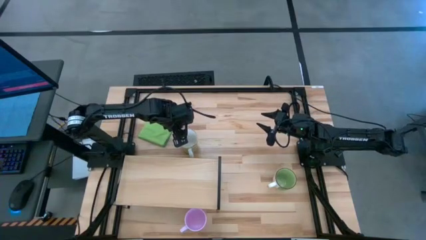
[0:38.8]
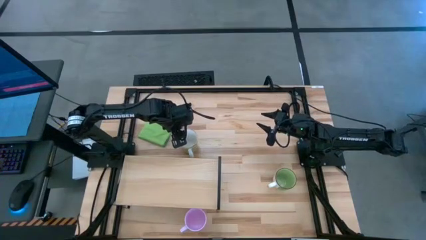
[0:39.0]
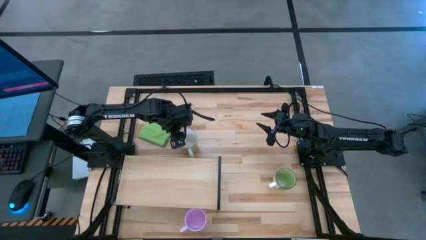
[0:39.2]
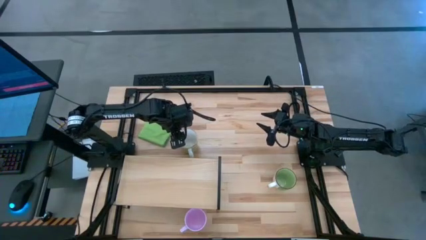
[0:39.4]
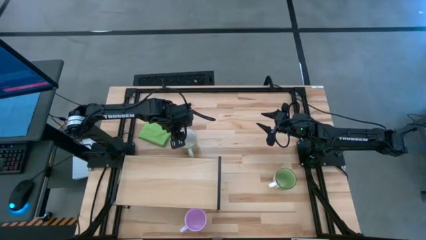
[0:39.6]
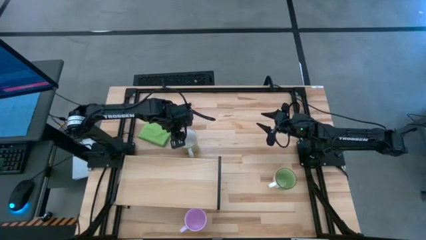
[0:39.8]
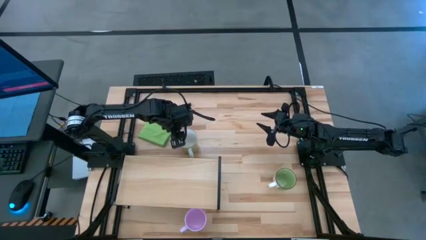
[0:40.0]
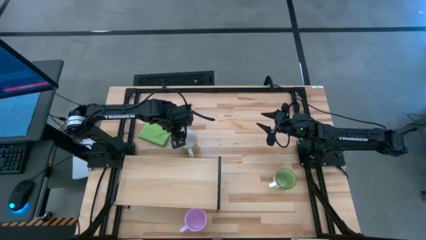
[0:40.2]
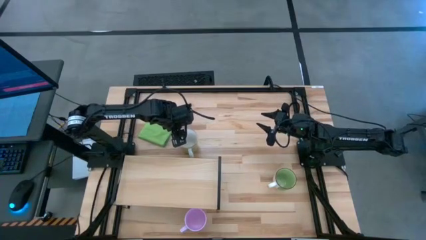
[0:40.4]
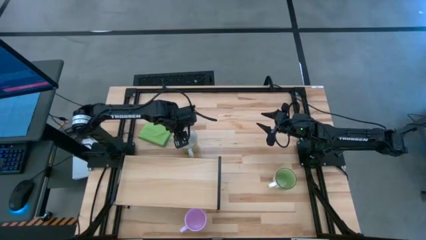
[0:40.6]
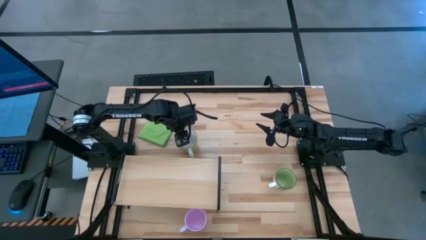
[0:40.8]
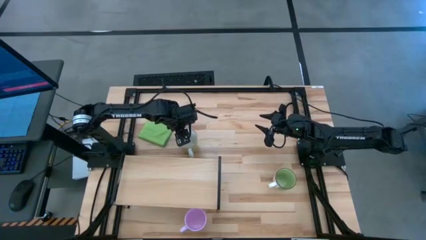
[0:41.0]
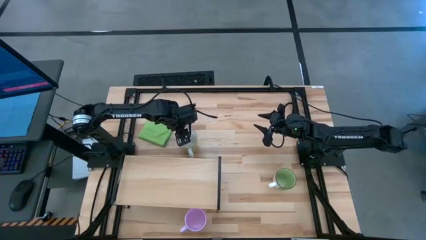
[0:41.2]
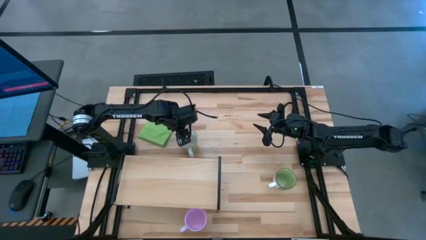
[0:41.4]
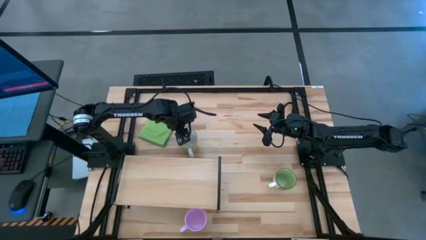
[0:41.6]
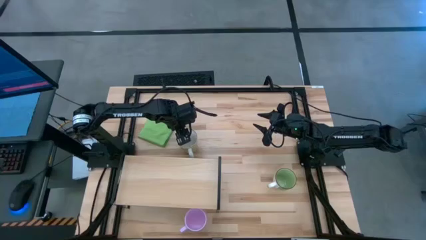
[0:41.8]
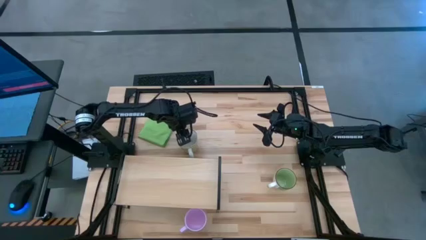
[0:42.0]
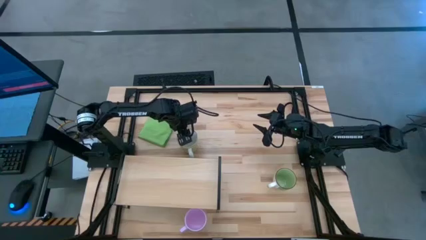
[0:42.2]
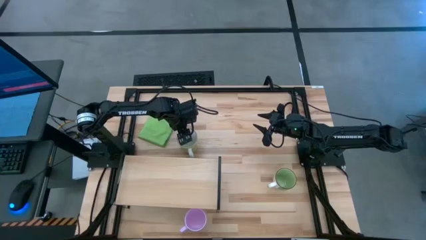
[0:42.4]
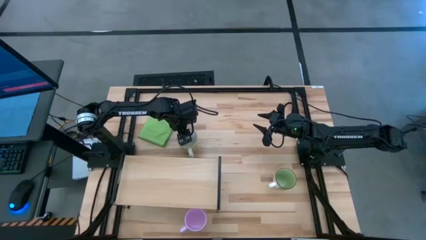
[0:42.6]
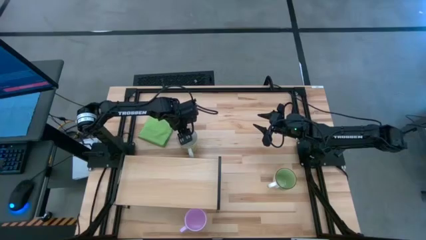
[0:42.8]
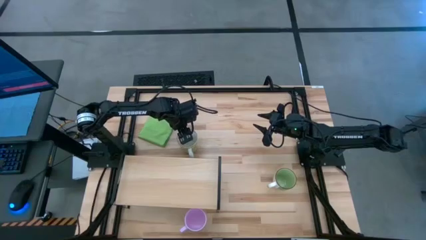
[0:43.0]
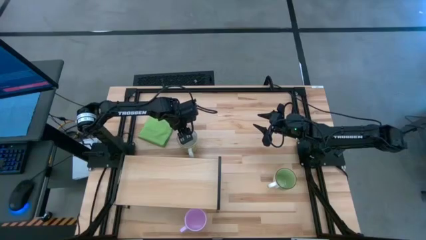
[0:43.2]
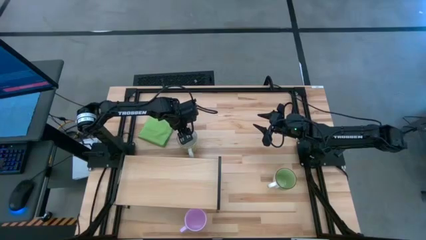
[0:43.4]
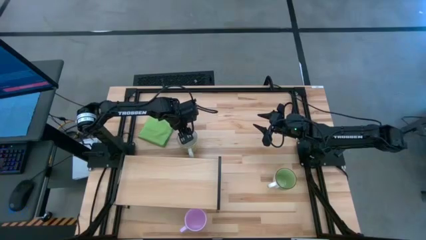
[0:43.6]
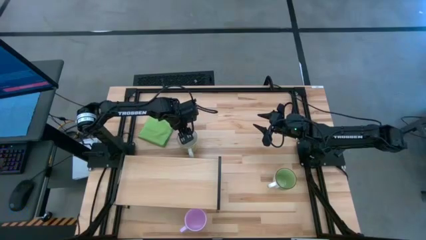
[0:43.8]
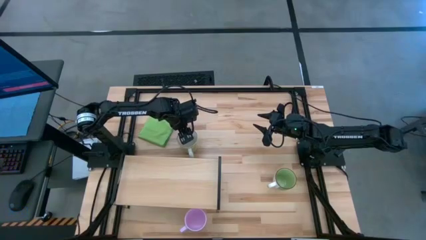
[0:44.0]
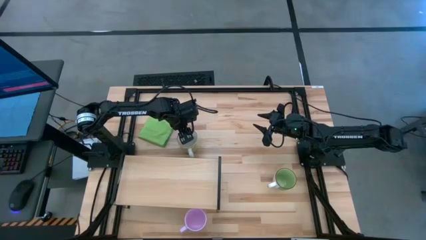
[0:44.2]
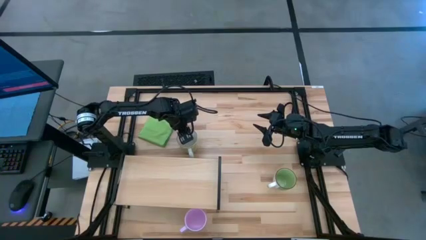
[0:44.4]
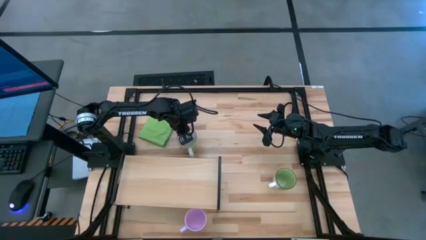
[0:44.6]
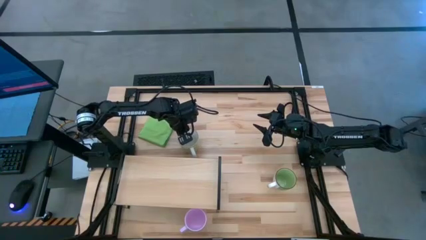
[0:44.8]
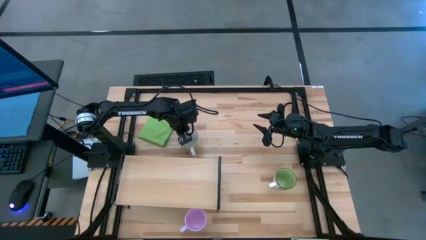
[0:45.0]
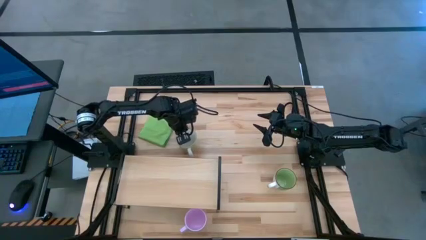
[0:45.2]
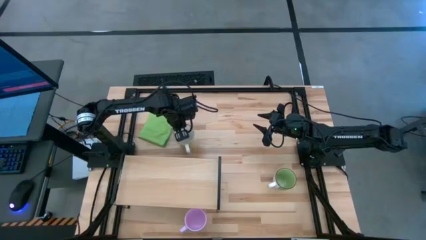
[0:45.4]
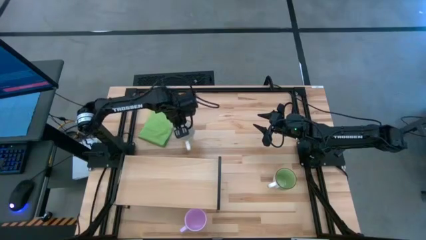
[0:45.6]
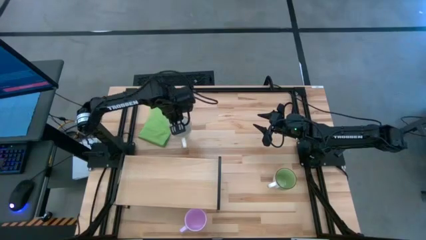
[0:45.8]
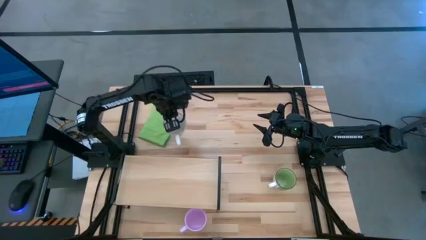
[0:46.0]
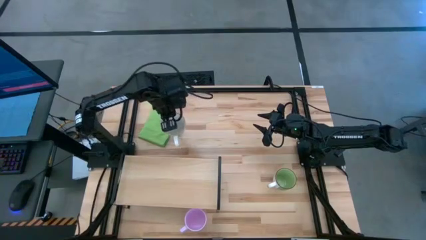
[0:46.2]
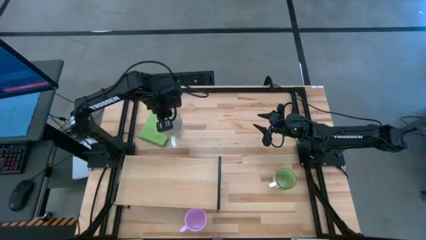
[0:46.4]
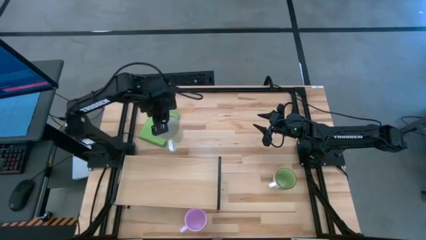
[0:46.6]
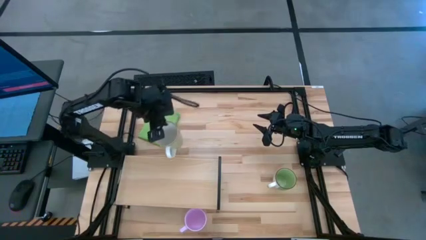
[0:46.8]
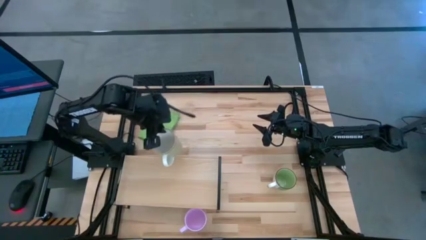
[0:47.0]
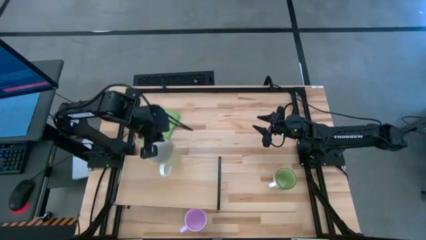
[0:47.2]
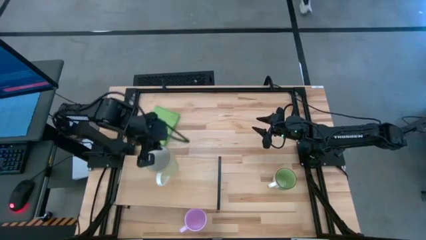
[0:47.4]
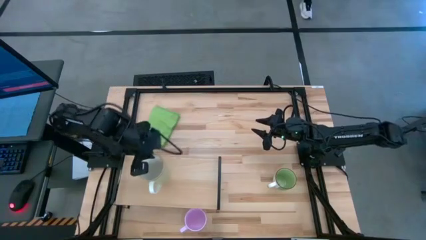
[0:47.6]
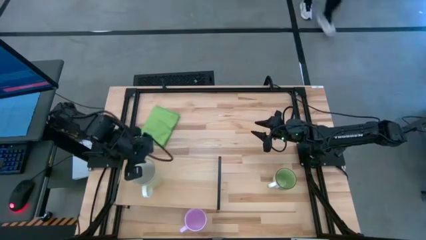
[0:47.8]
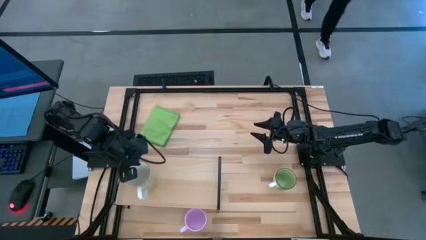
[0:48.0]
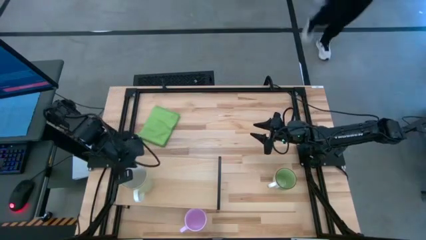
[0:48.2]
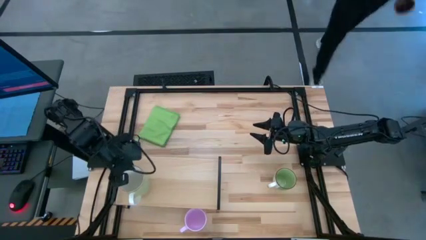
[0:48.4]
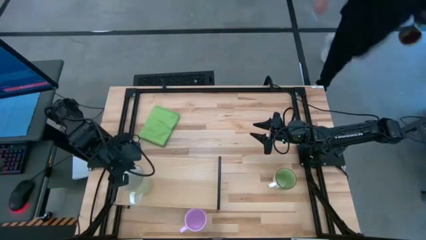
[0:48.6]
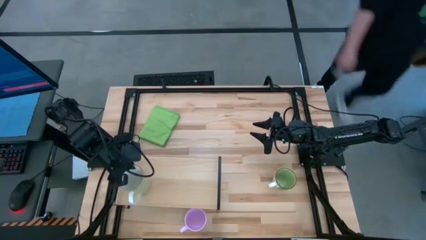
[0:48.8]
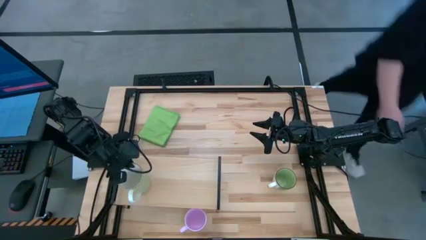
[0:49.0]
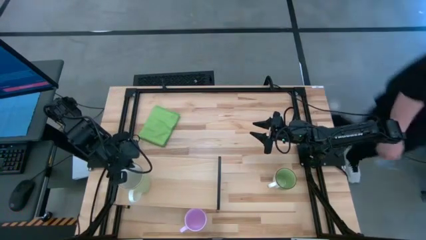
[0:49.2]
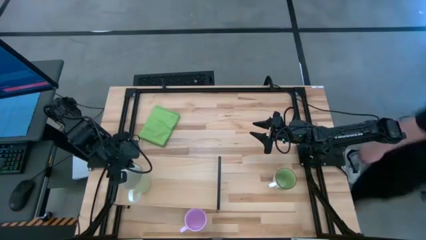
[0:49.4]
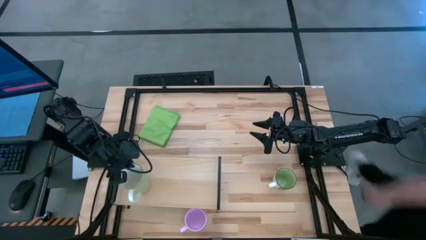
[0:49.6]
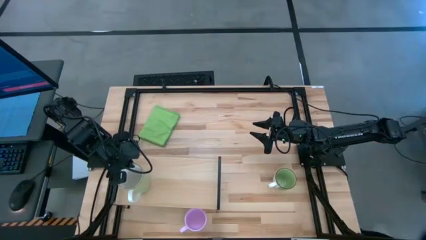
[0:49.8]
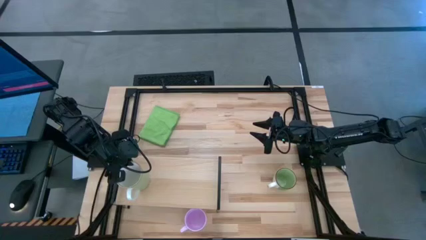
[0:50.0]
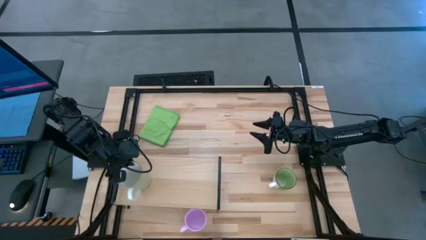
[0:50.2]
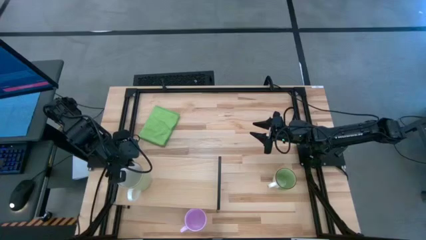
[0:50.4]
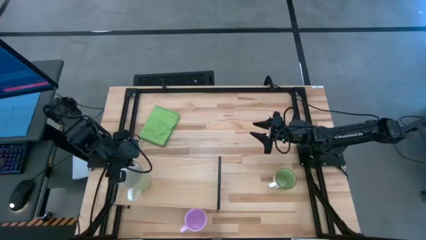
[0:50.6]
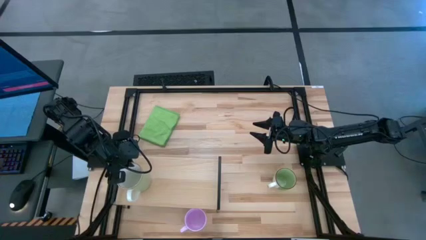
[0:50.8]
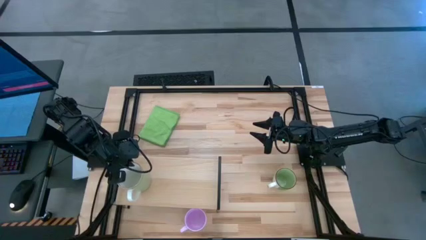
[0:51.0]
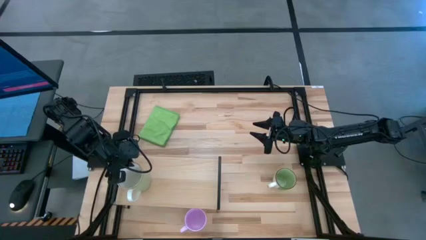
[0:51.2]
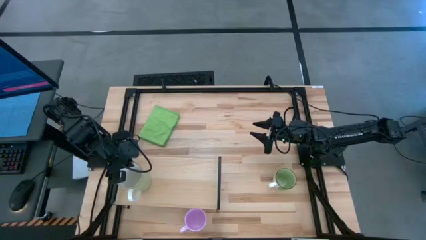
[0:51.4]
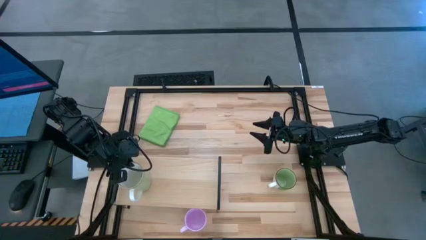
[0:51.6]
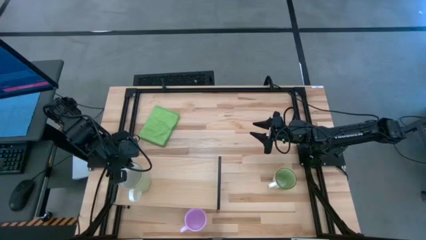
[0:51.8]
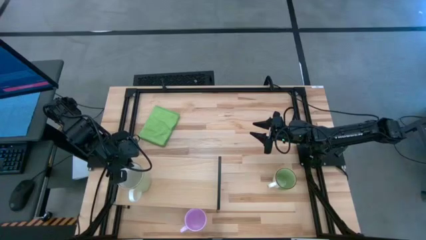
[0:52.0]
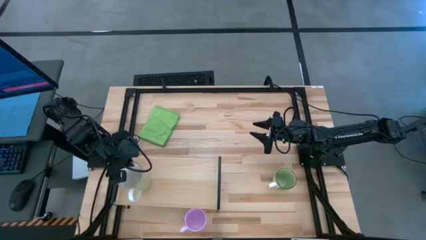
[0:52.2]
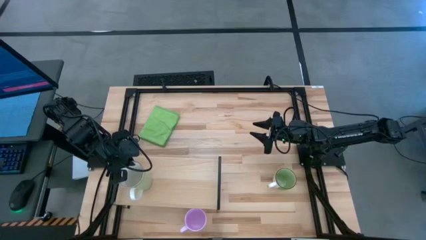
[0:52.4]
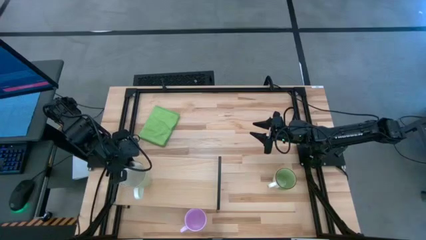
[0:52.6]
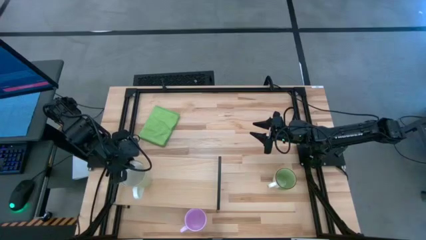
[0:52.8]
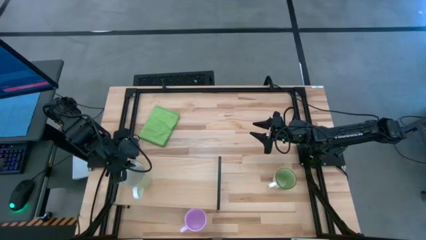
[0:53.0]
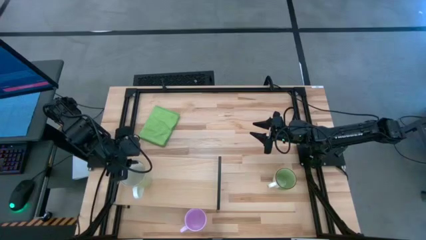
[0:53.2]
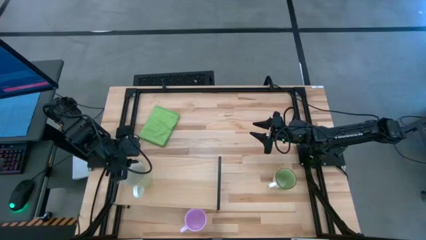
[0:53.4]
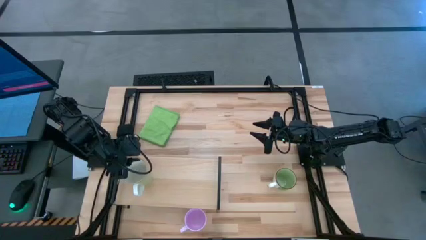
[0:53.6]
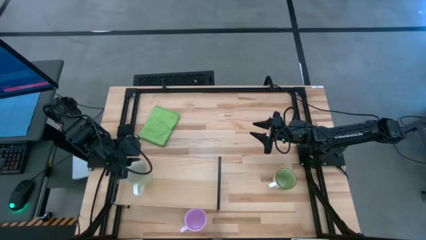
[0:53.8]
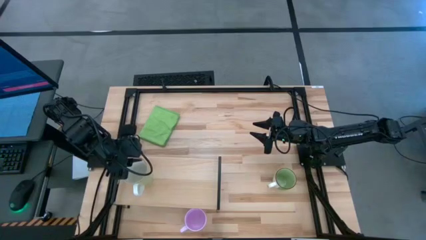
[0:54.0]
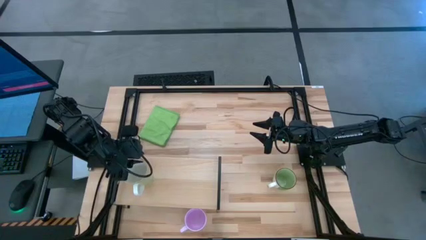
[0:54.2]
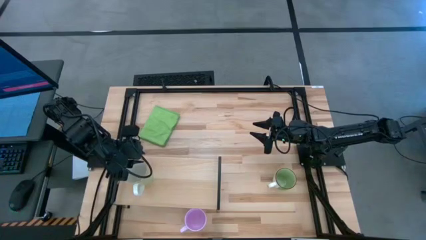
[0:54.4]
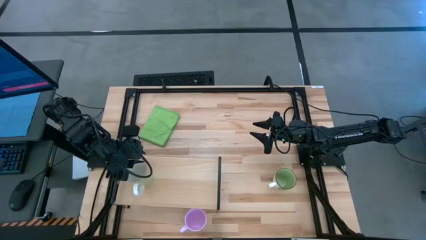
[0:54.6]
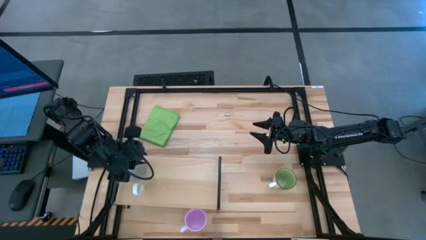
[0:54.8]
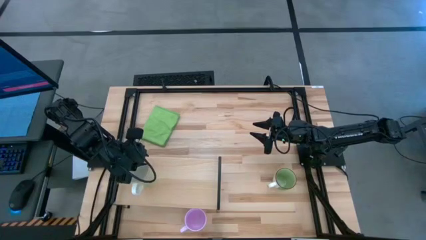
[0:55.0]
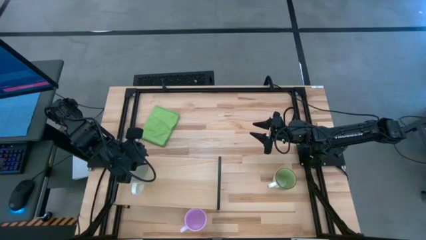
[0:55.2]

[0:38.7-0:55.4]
Task: Stack small to large cups/mugs on shelf
Put the light green mug on the shelf
